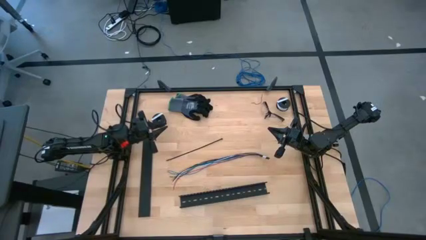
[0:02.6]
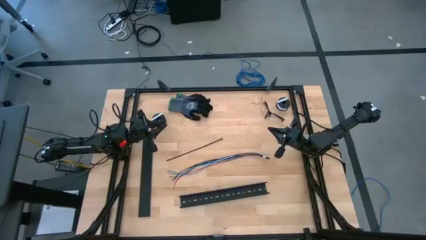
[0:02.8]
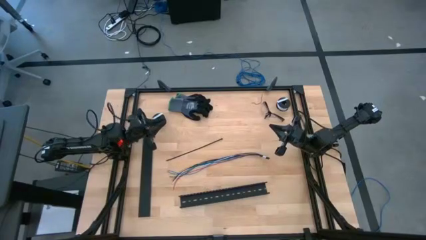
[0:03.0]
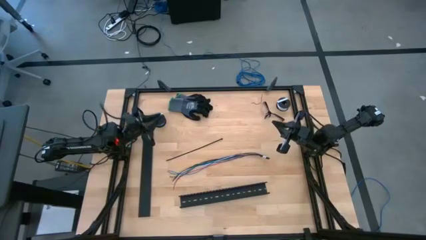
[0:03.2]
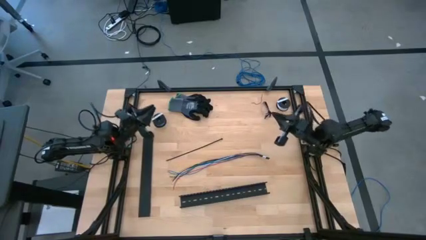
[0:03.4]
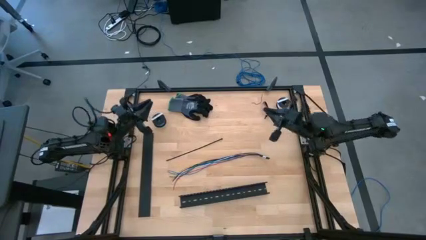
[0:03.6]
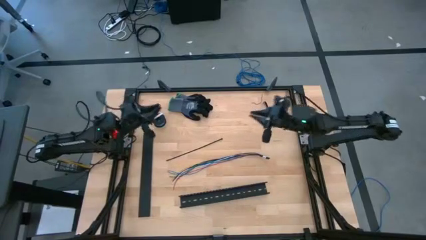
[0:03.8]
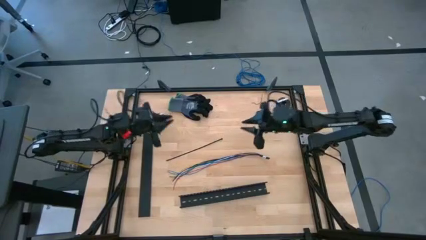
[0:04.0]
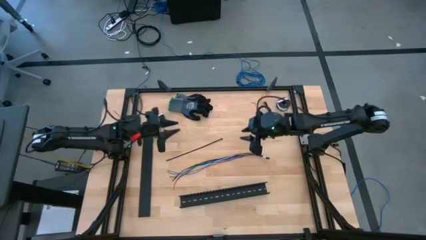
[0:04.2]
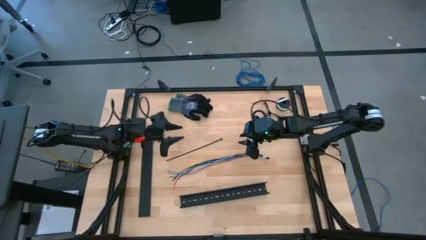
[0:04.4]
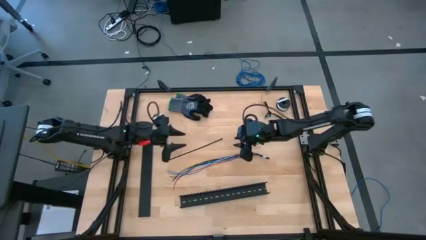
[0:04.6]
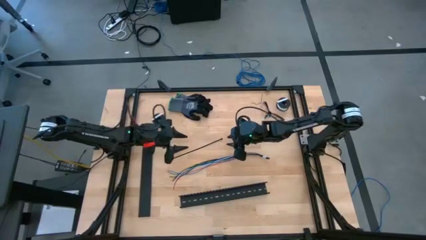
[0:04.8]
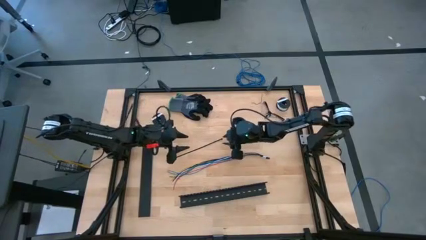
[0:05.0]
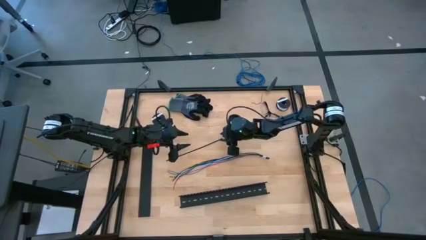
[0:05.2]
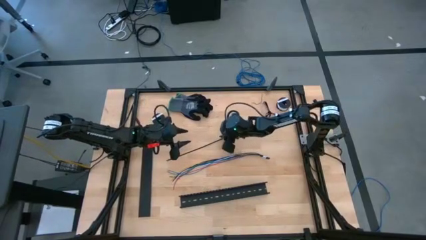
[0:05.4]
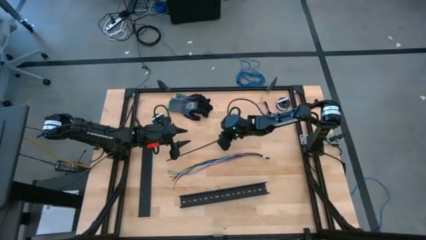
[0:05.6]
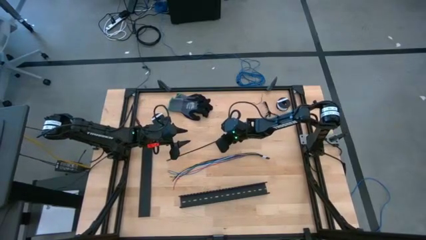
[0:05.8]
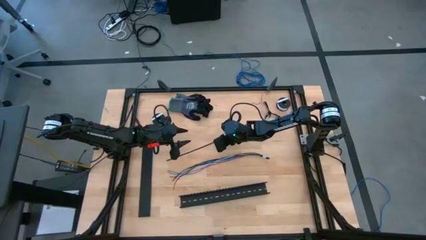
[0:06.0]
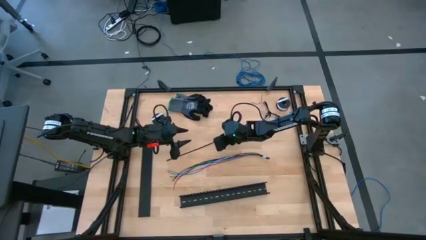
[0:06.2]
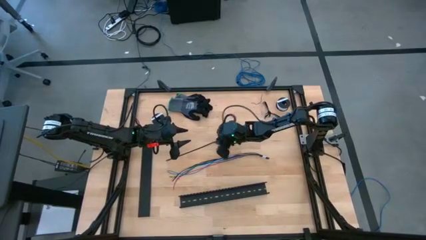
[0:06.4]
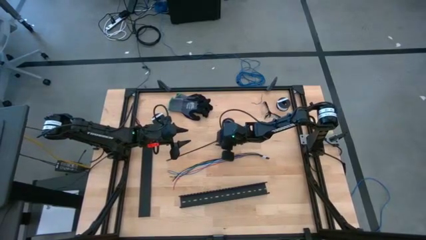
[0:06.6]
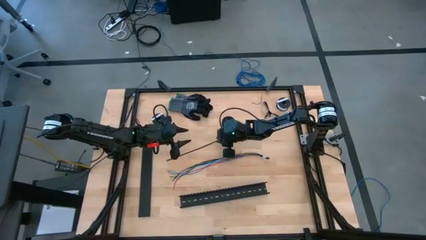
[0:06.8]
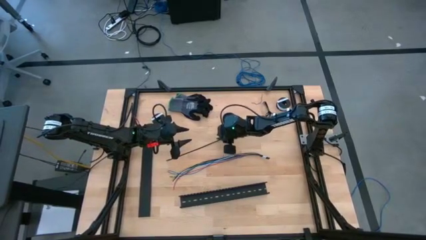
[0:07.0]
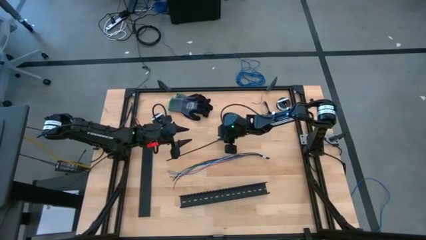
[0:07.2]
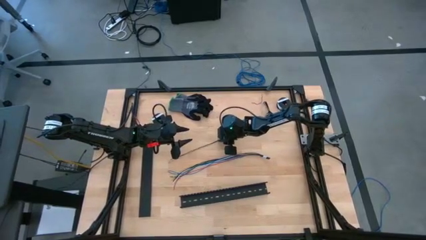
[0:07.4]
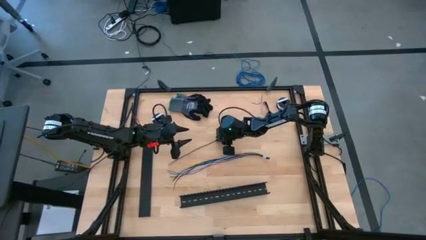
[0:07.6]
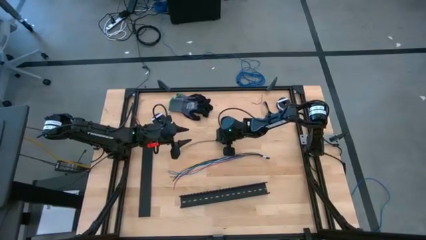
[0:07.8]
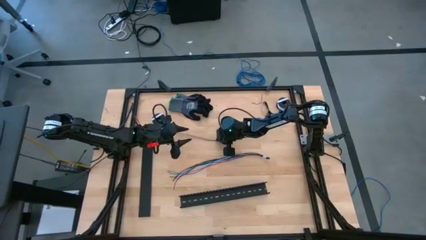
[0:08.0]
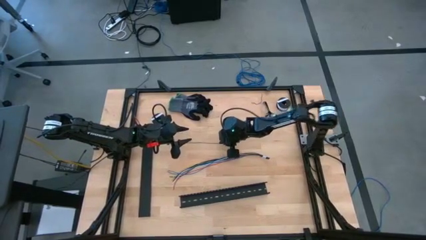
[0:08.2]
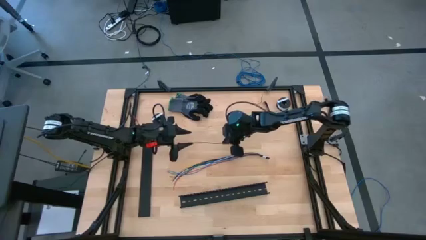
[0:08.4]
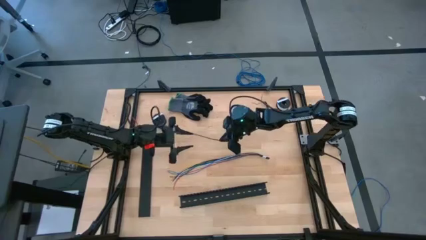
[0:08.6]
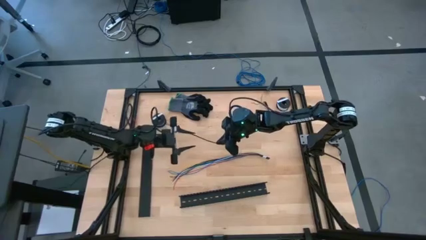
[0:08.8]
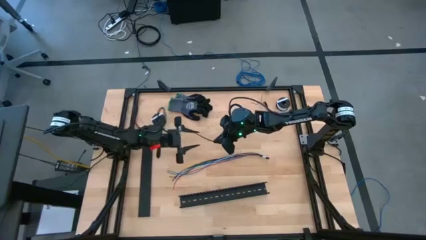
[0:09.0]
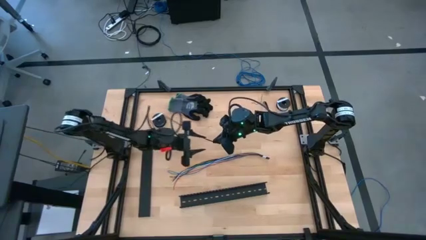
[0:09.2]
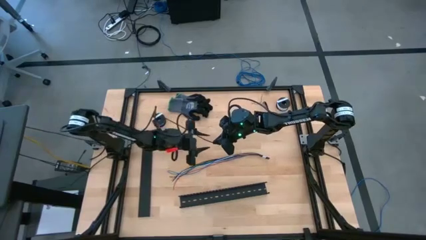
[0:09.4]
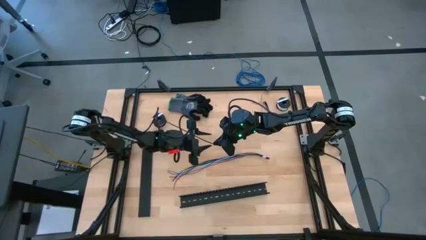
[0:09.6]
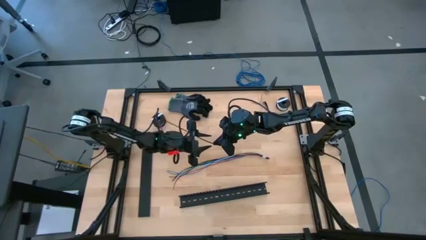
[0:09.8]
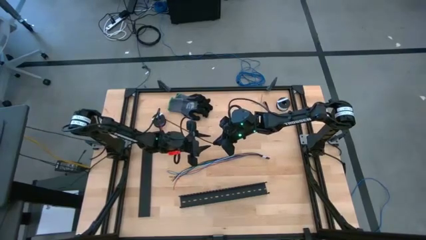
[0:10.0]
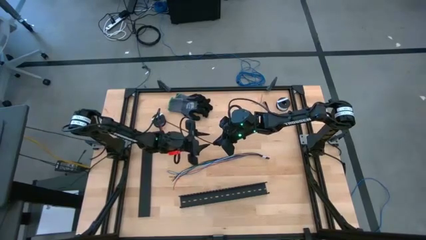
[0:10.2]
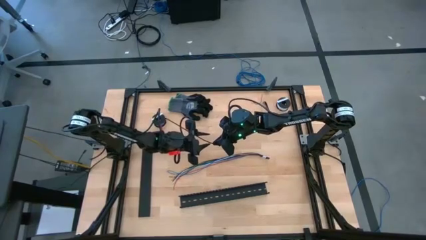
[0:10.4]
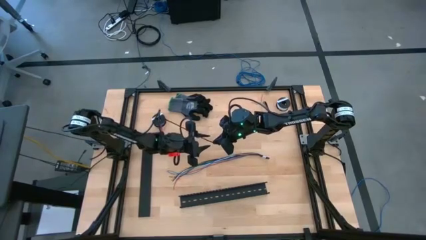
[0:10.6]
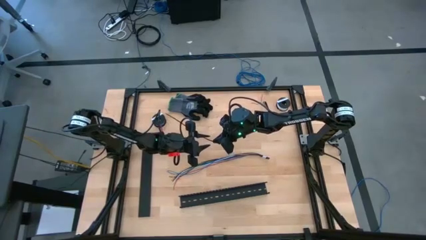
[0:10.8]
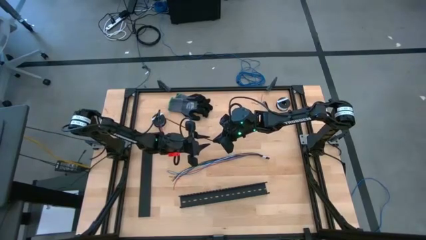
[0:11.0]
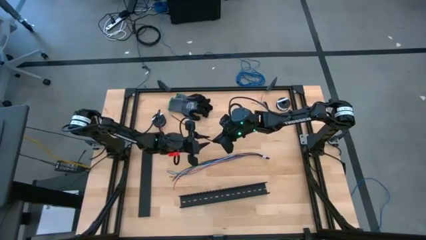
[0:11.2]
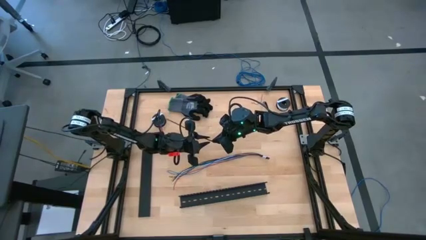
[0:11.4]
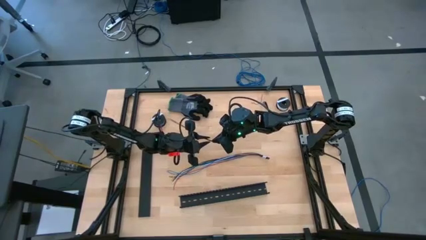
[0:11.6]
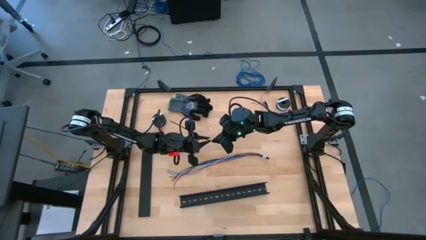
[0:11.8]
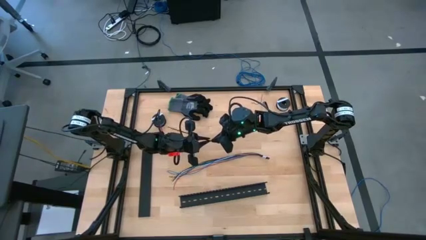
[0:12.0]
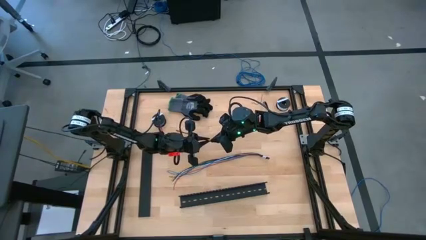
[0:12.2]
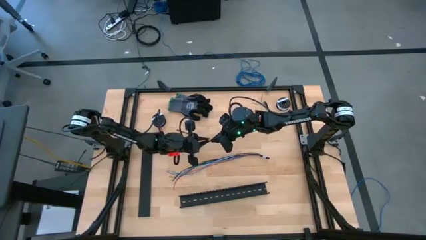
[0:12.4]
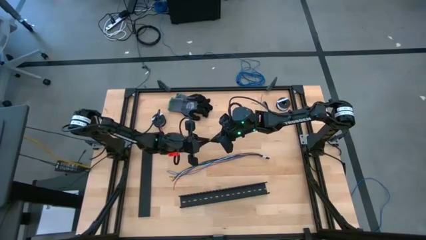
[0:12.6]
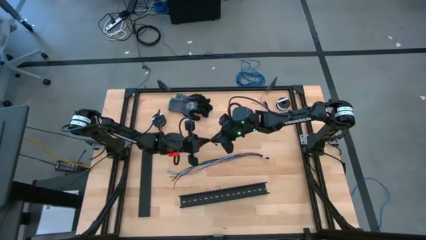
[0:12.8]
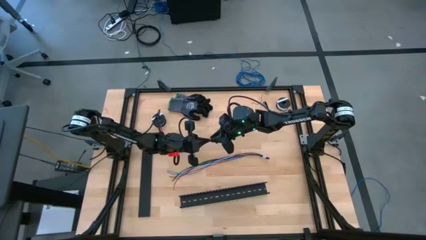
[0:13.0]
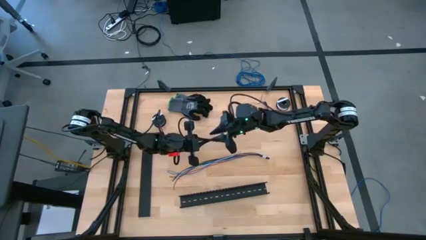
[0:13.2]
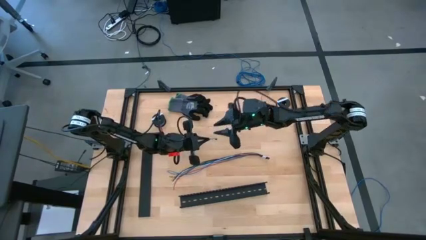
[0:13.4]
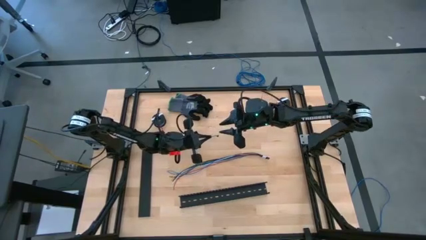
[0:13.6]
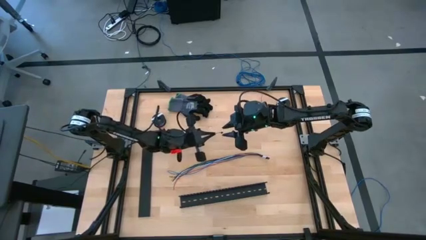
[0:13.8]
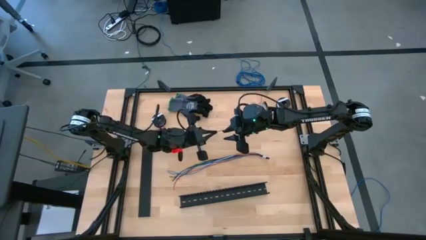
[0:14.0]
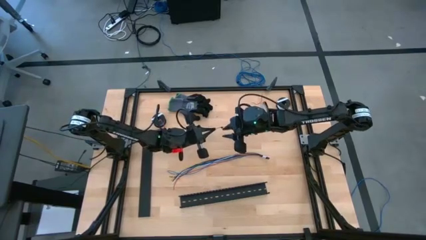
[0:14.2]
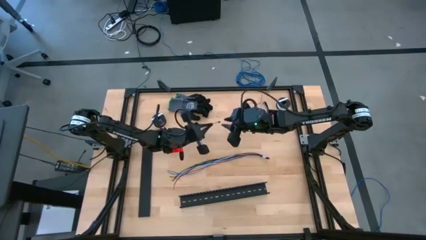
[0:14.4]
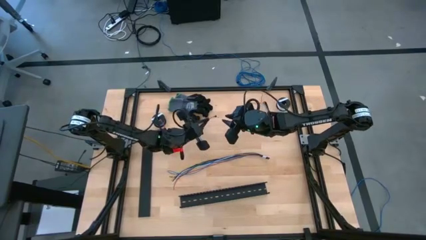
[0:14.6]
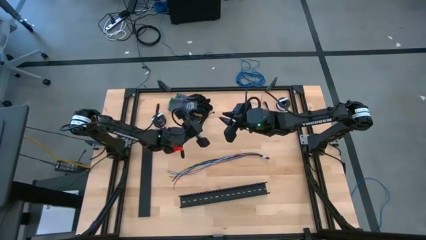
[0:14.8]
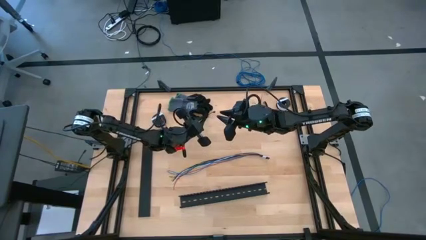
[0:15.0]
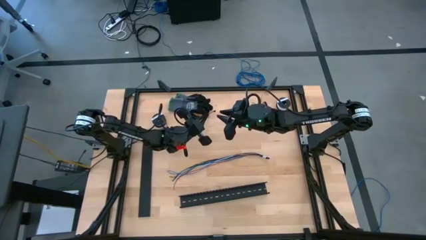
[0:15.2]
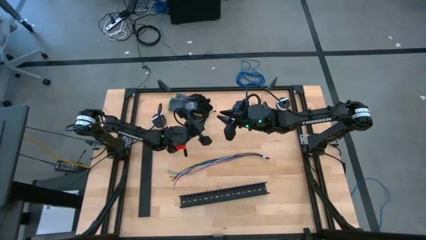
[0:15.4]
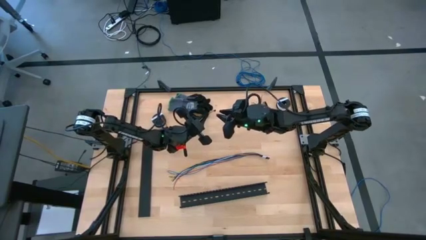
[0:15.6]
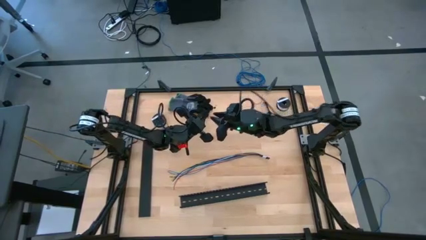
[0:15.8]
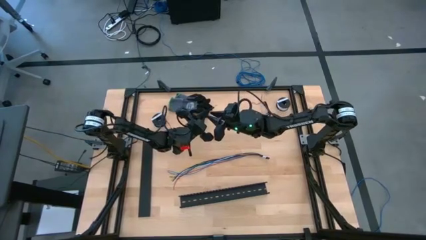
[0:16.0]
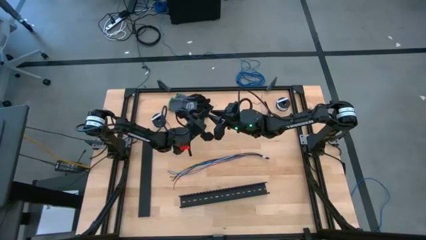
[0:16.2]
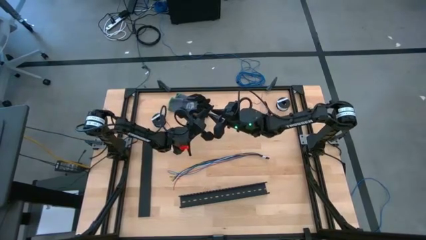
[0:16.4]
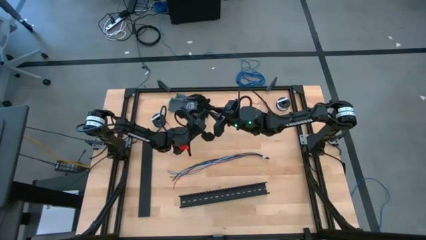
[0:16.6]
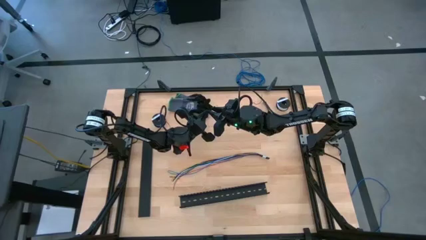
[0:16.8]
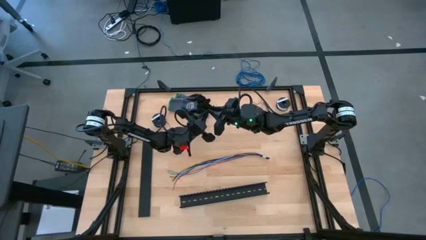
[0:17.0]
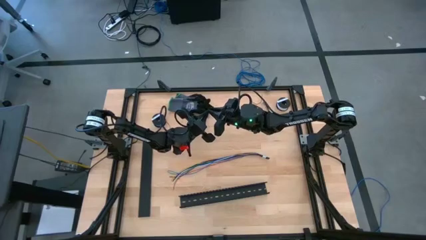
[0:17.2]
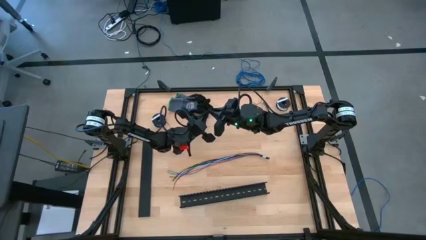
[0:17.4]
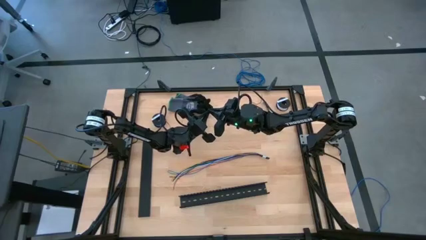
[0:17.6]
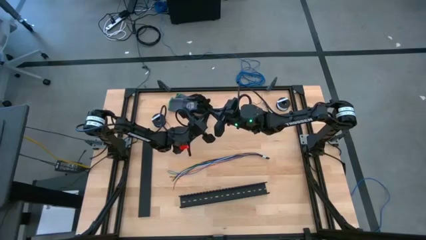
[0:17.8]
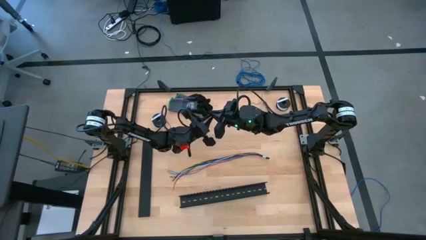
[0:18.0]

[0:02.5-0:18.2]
Task: Ziptie cables
Wrap the cables together using the black zip tie
